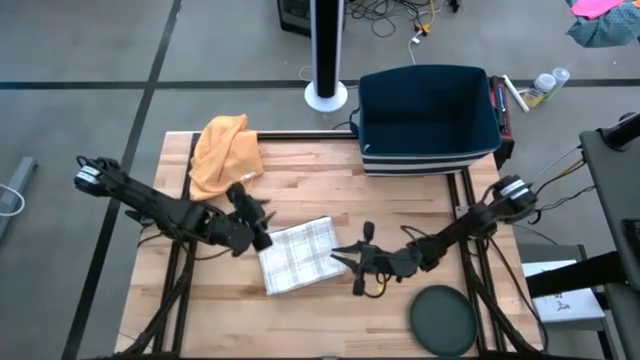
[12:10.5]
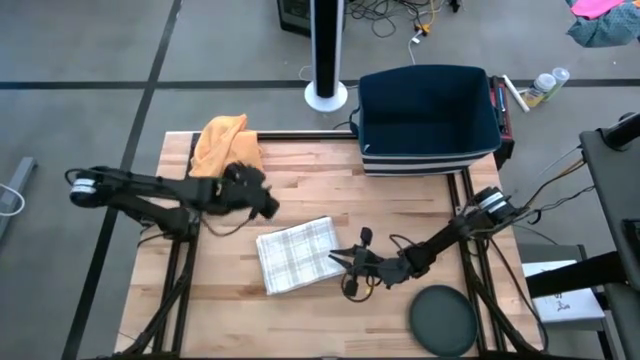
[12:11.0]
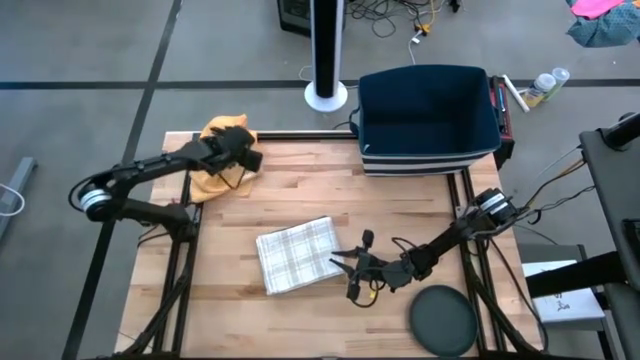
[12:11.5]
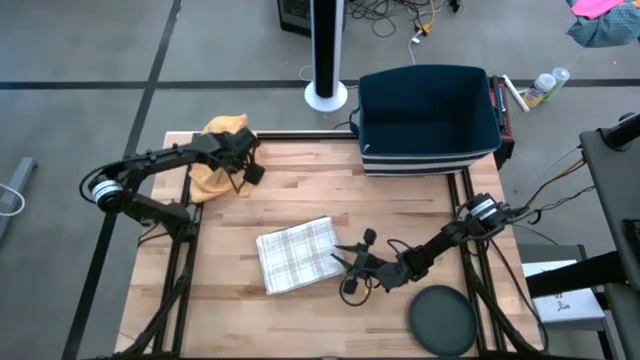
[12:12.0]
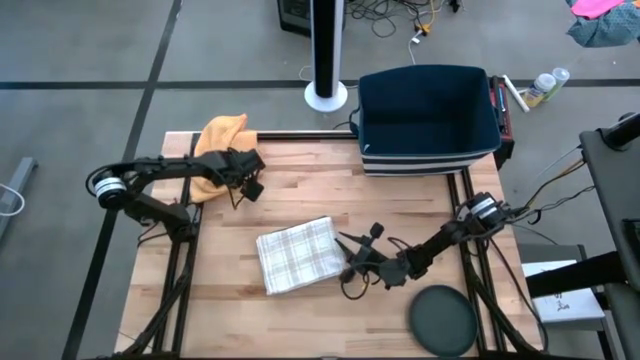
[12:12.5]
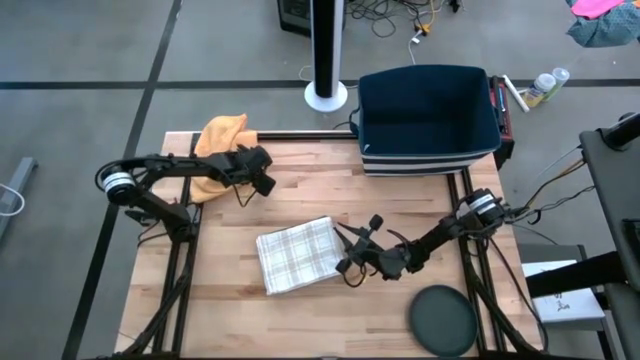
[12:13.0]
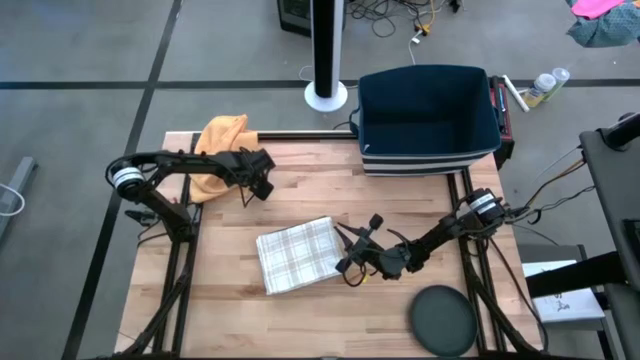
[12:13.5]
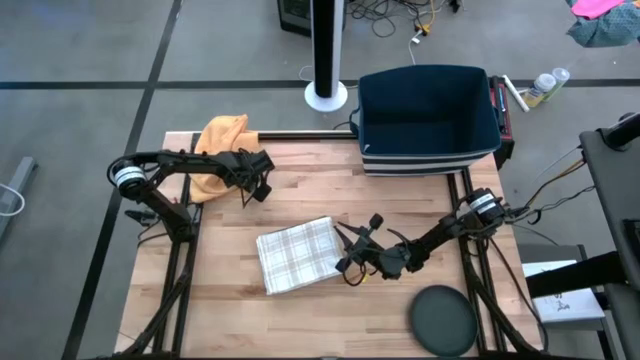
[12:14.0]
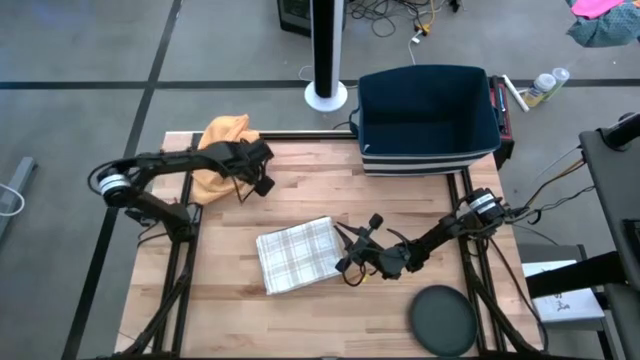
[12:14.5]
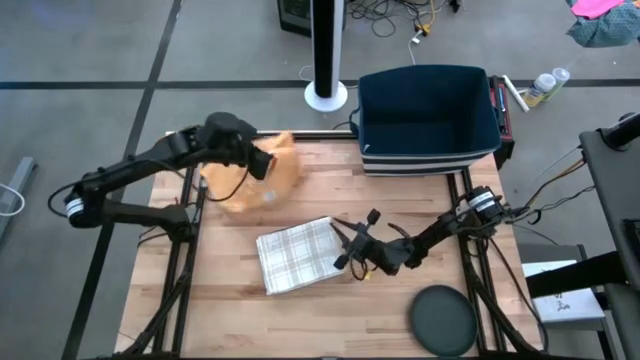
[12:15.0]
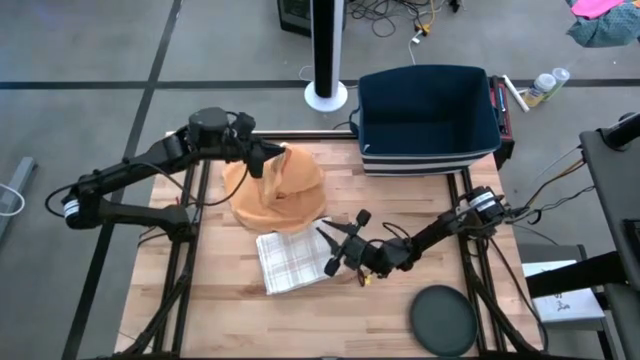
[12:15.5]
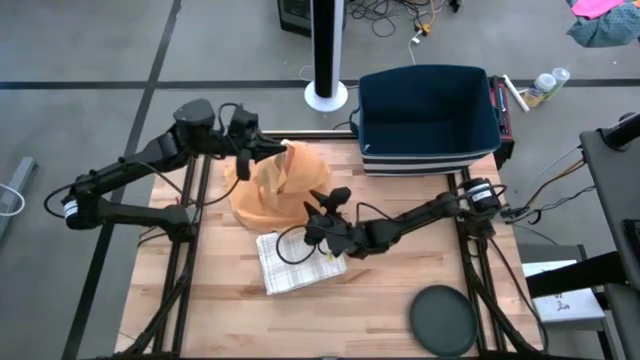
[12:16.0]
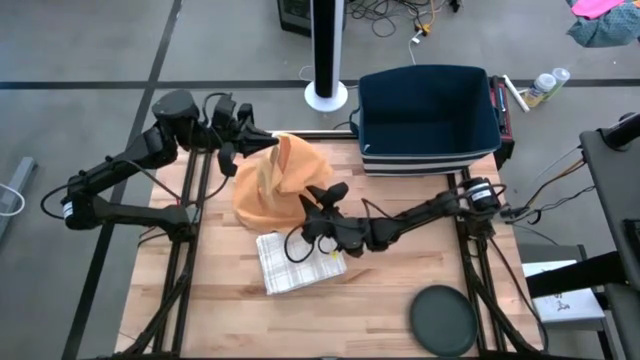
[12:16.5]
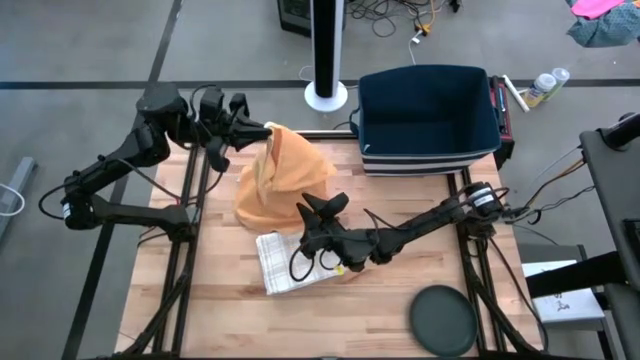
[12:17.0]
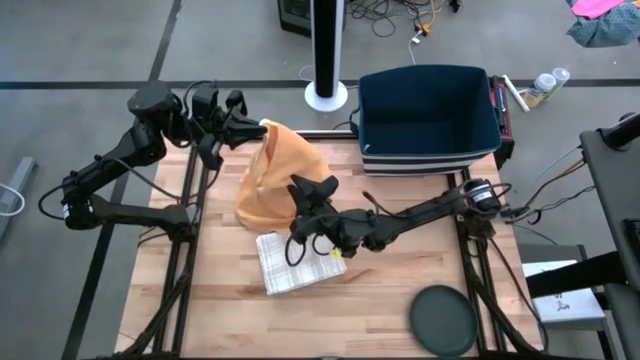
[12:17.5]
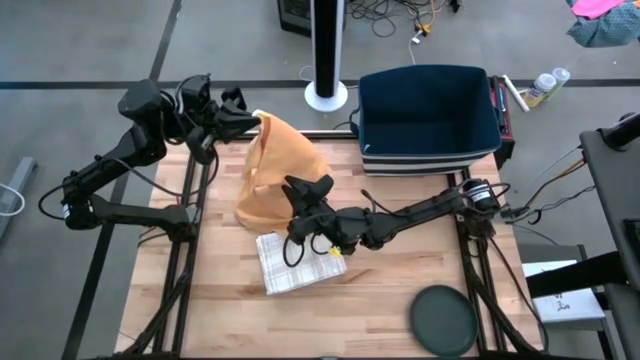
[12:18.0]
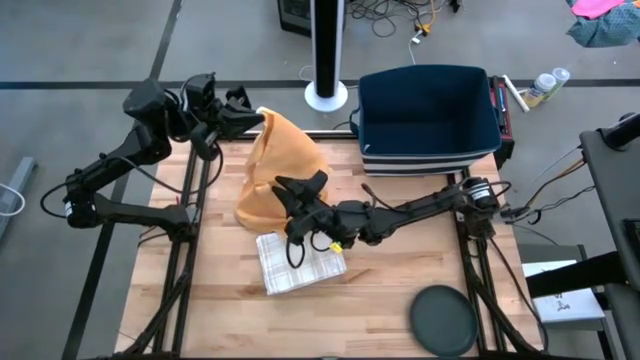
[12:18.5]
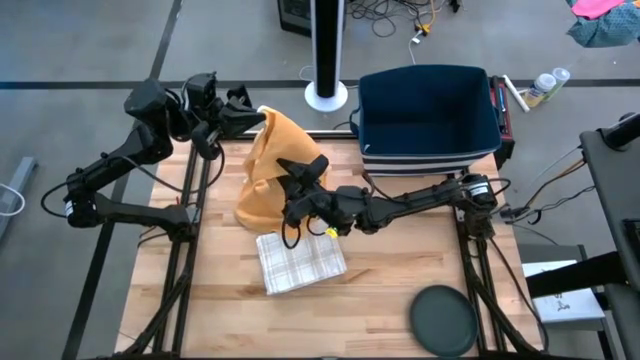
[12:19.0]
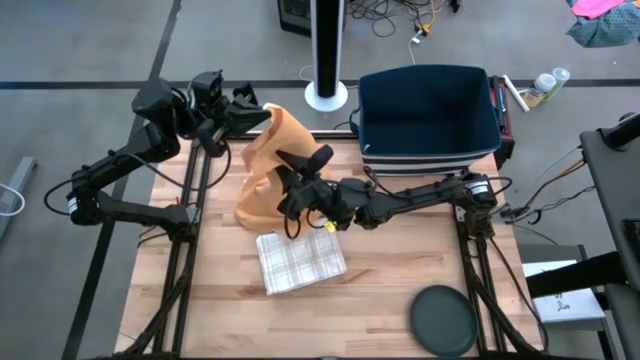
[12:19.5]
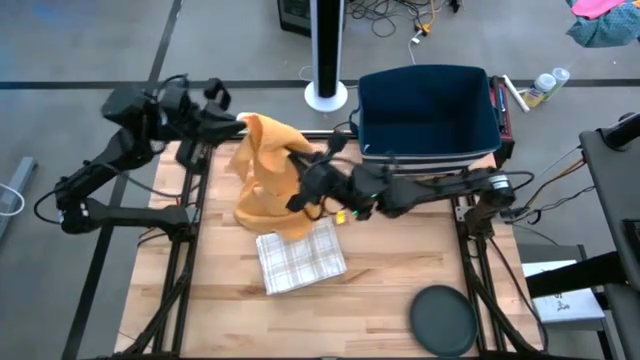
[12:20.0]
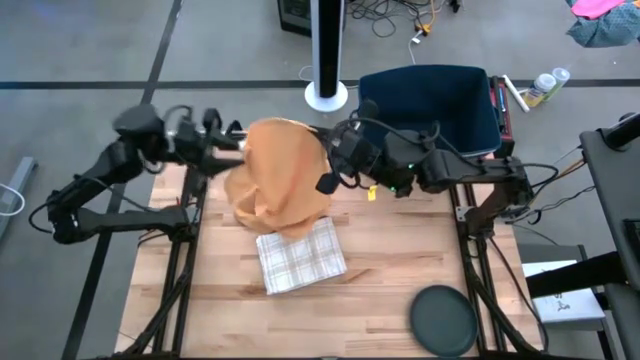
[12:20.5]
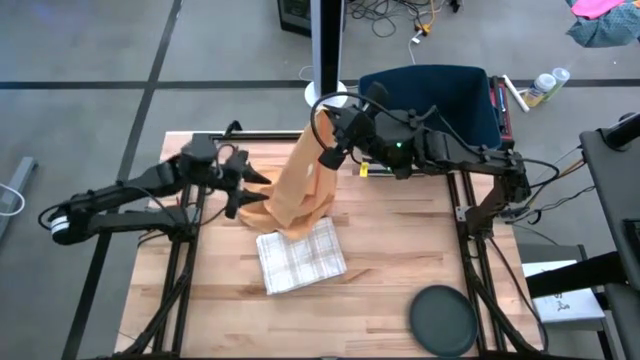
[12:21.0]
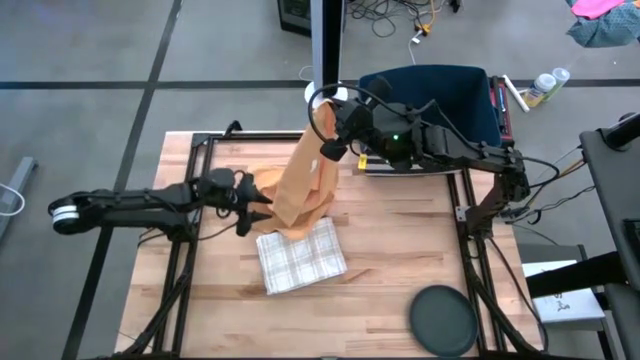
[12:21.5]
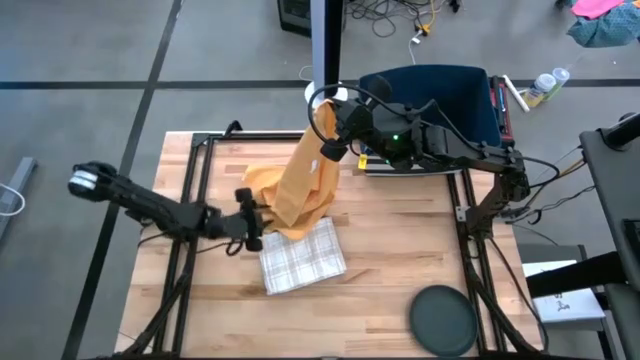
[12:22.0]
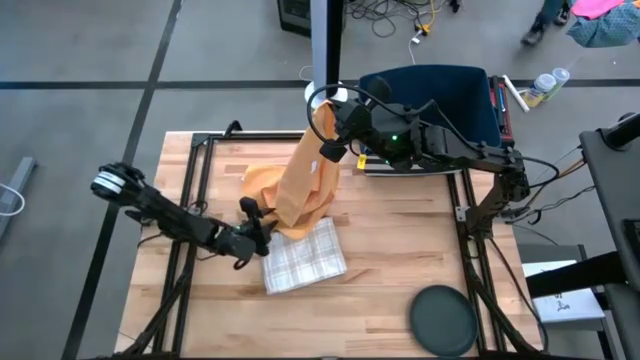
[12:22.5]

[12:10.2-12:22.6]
Task: Fold kitchen towel into neat rectangle
Fold the orange towel

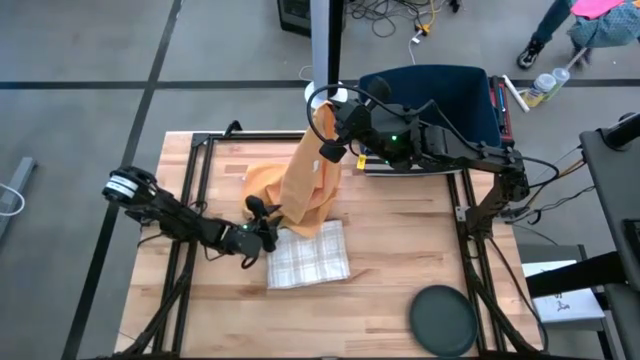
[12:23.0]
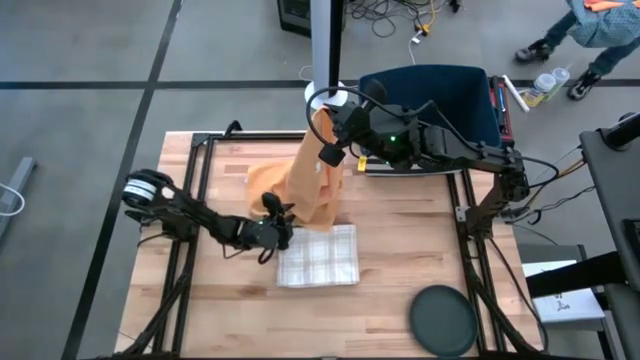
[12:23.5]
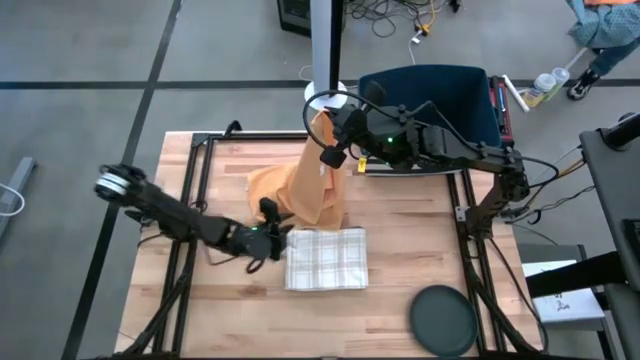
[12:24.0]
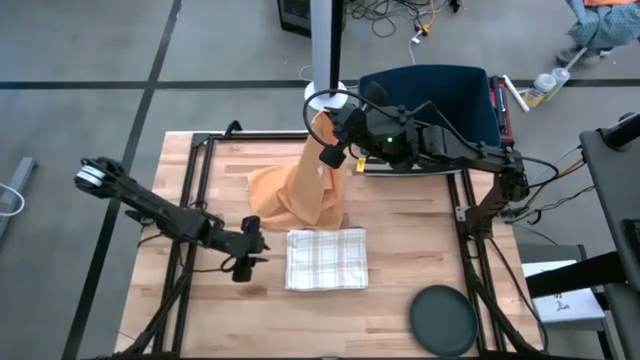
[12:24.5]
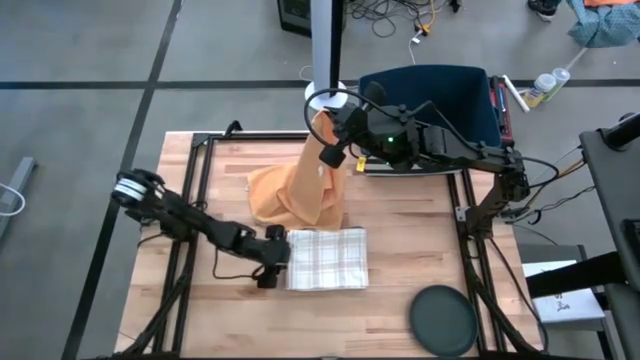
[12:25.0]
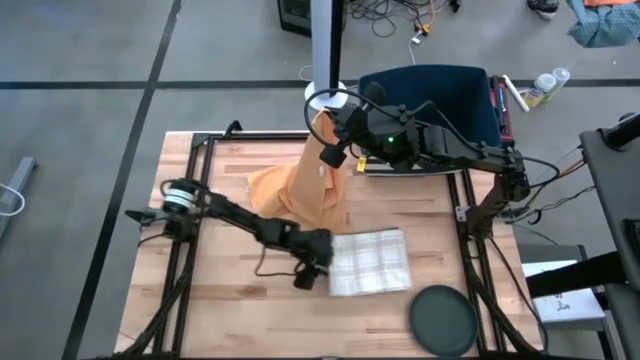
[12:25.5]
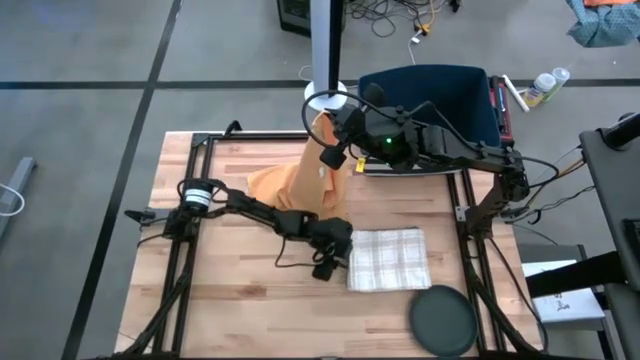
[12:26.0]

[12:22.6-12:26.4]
Fold the orange towel

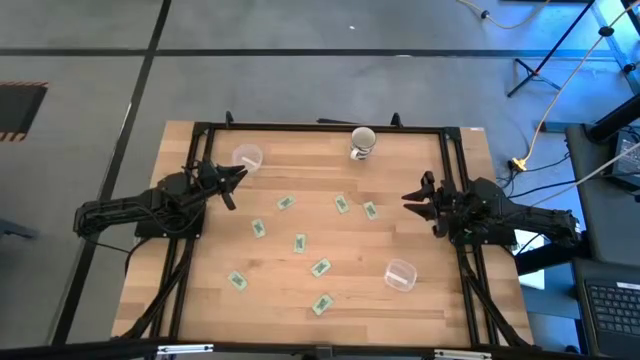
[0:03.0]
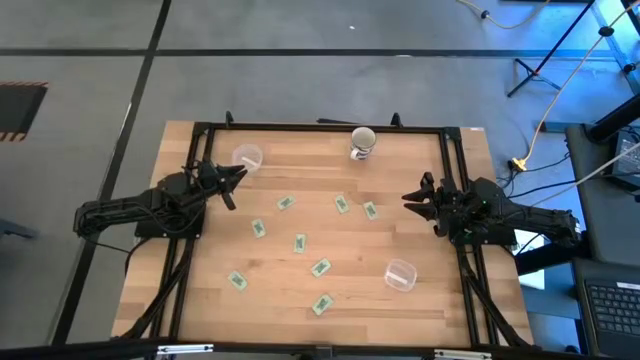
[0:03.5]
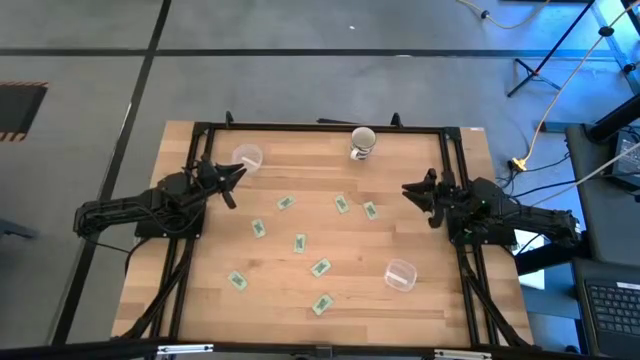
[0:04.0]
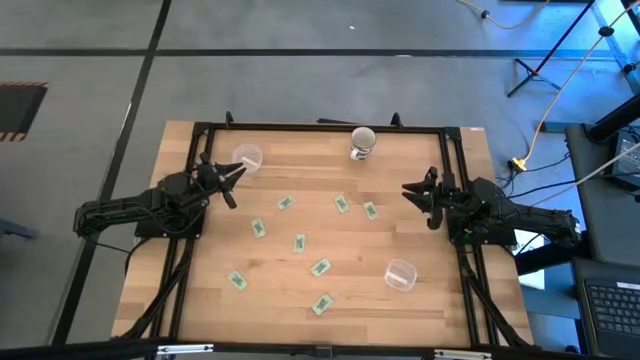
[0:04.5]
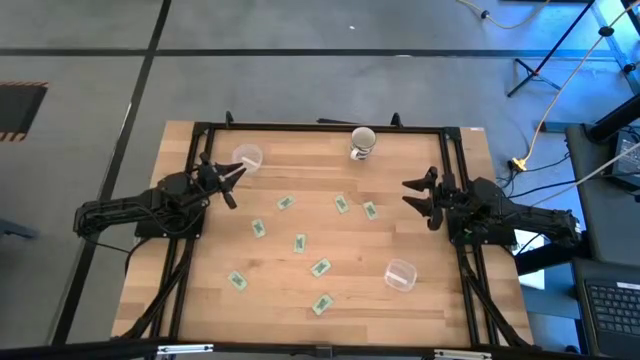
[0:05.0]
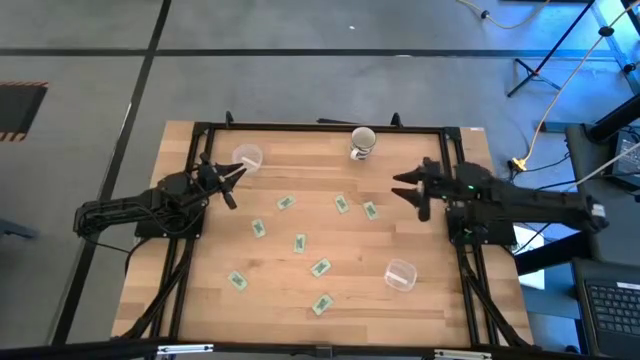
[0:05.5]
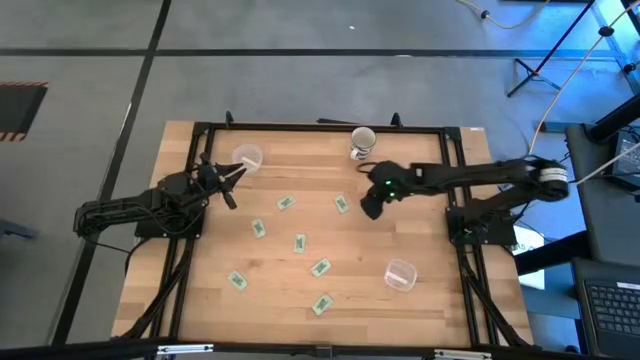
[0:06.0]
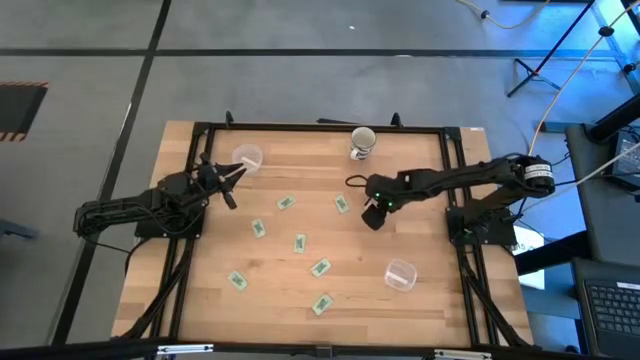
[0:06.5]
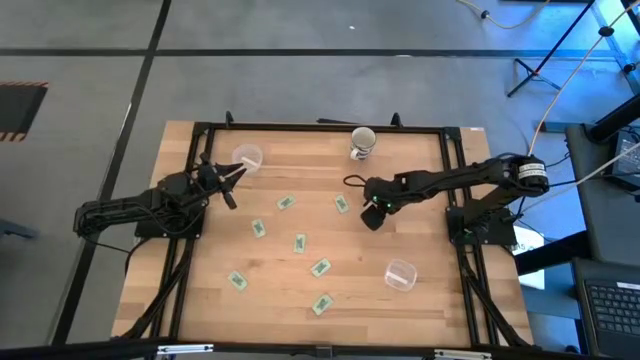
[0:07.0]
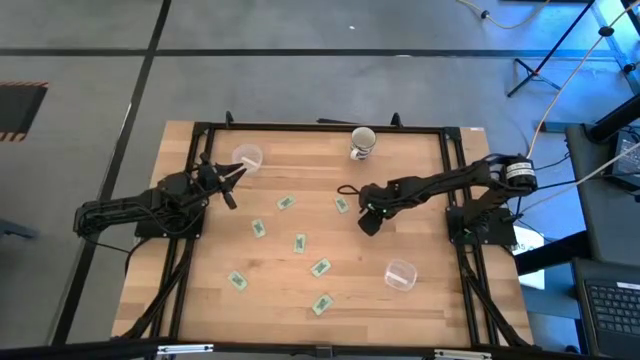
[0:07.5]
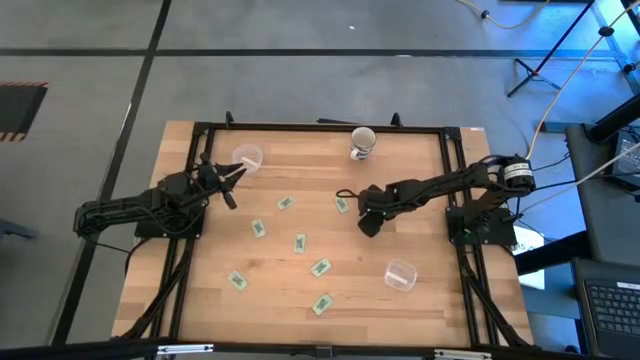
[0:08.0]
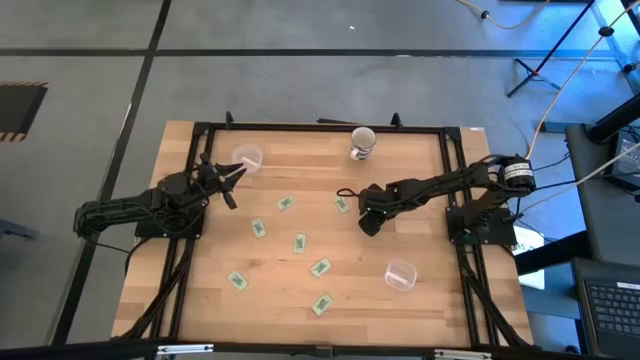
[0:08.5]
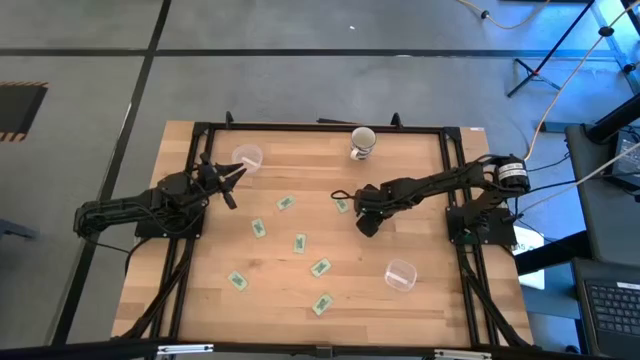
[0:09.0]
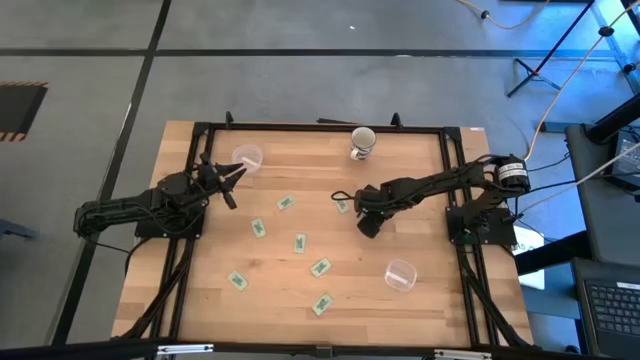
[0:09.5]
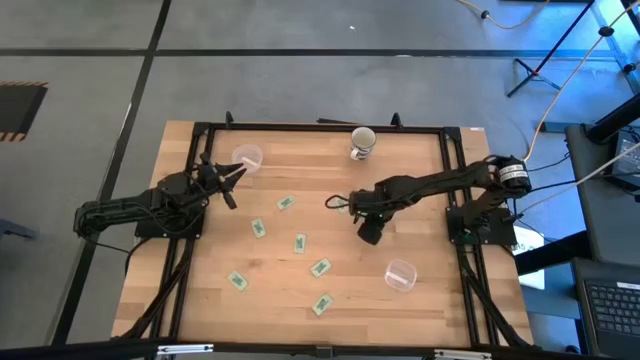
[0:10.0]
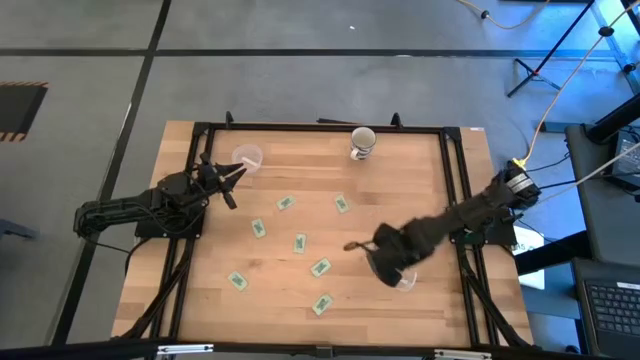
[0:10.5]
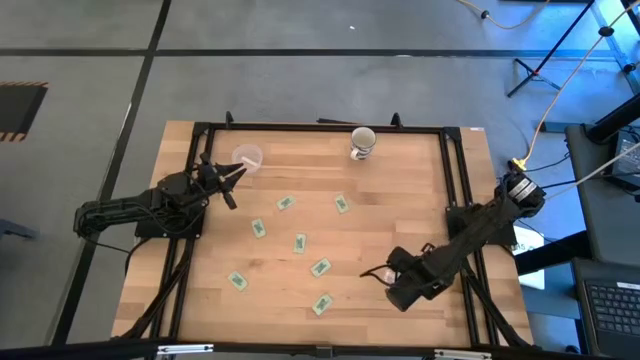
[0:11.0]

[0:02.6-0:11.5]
Task: Pick and place items into bin
Put the white stevia packet into the bottom transparent bin
